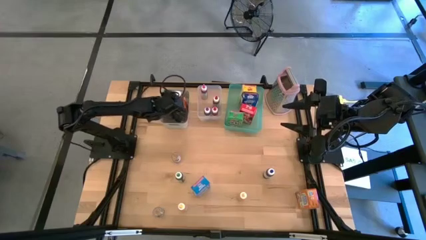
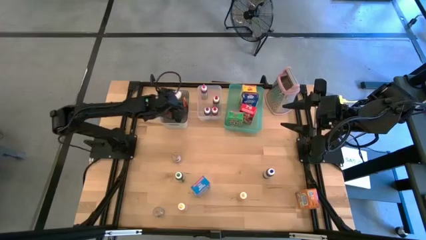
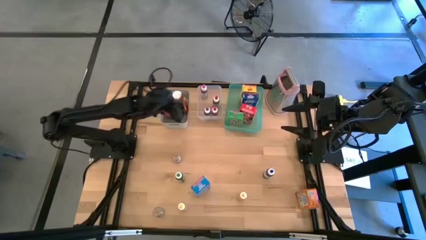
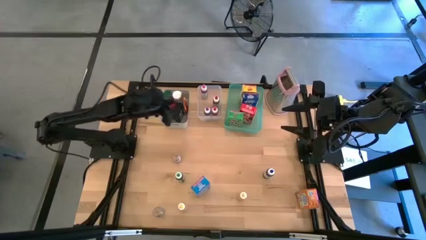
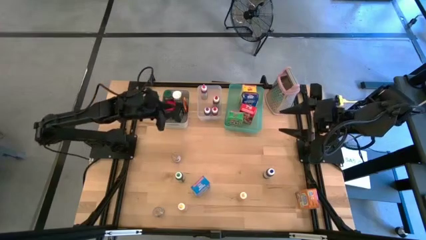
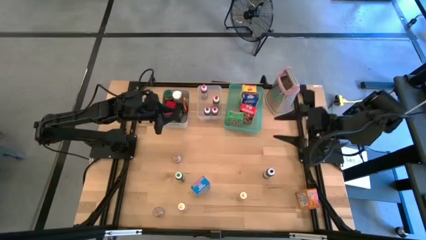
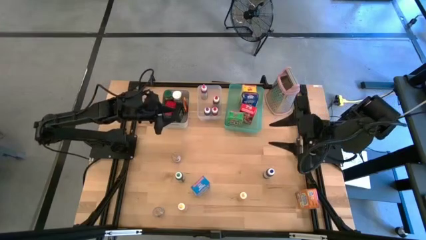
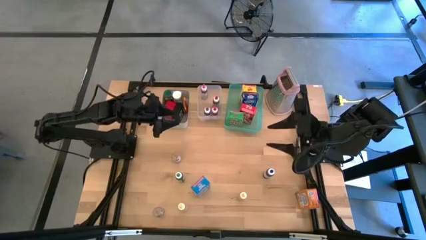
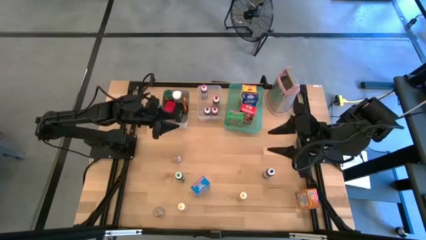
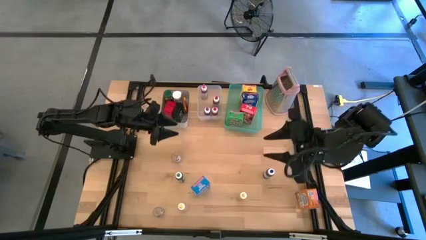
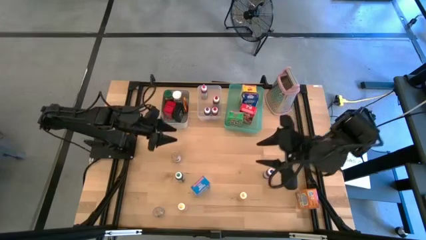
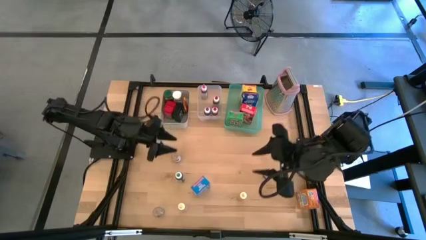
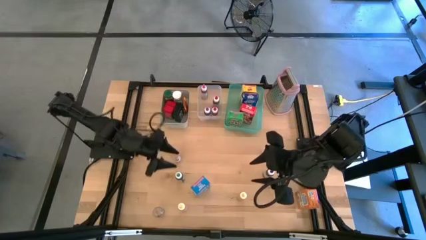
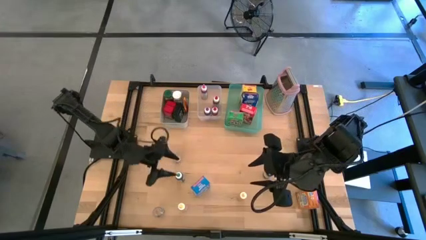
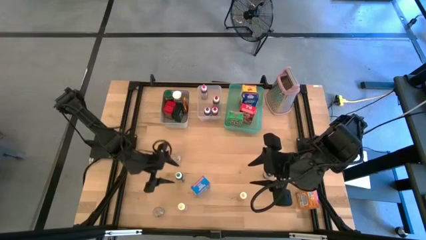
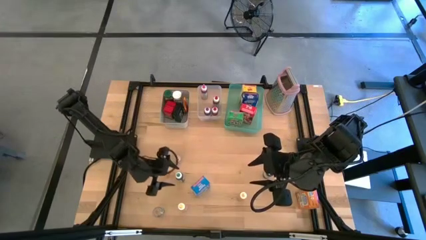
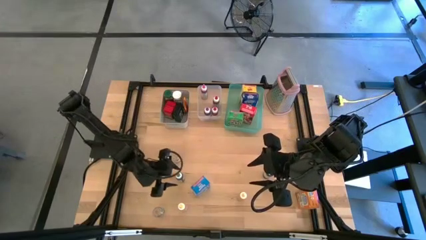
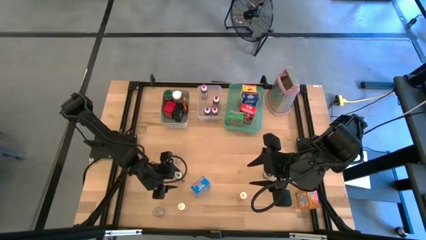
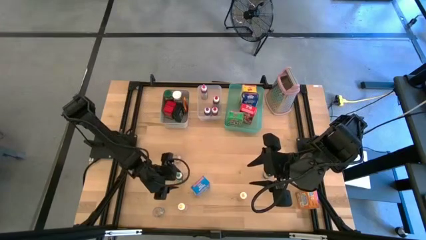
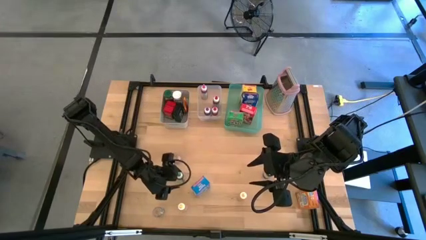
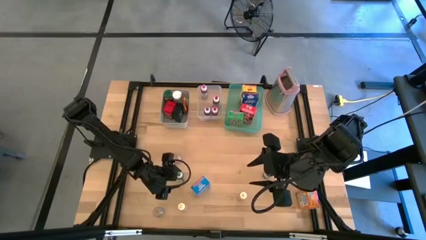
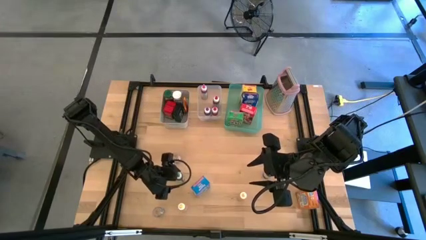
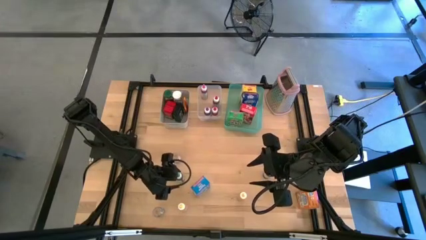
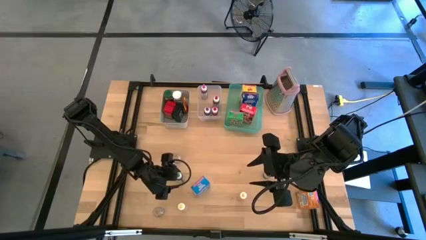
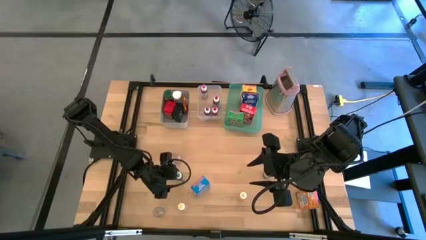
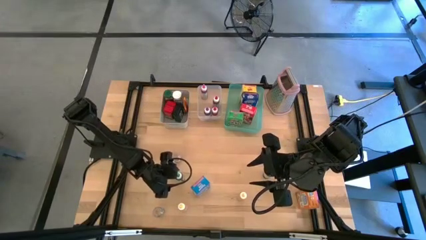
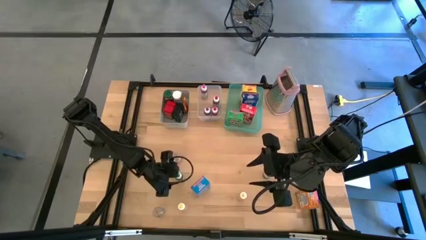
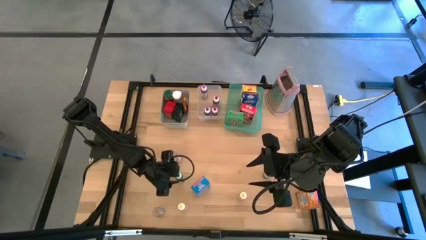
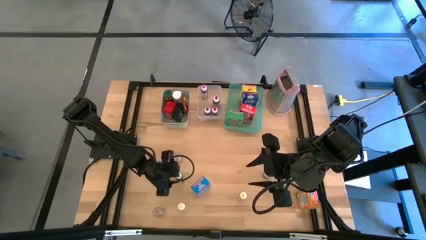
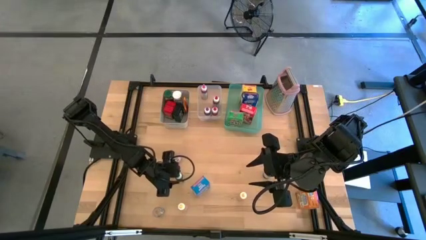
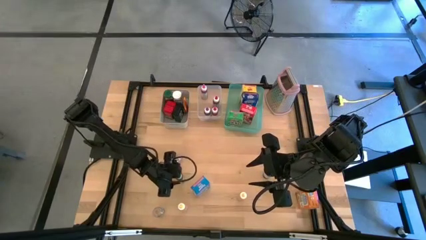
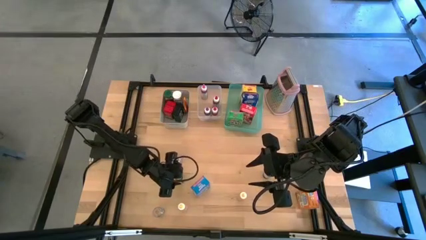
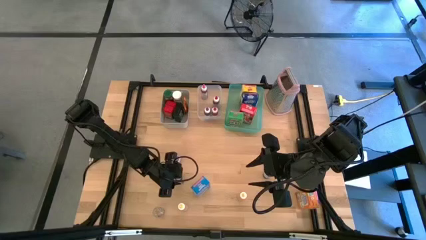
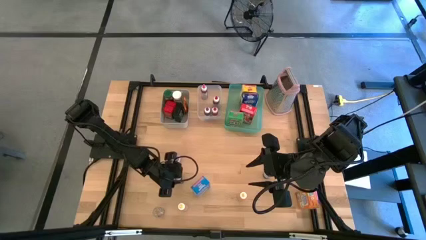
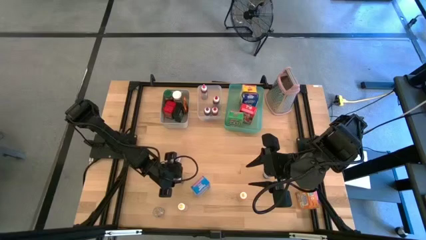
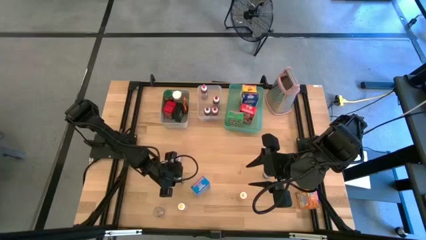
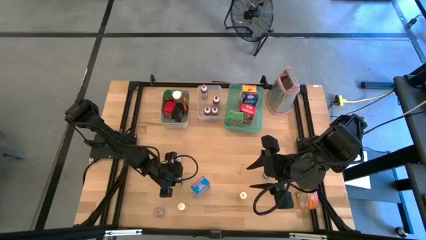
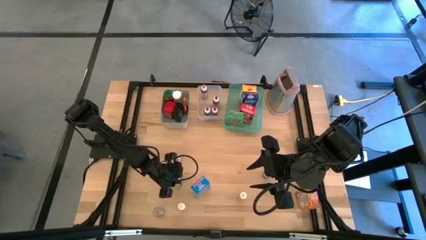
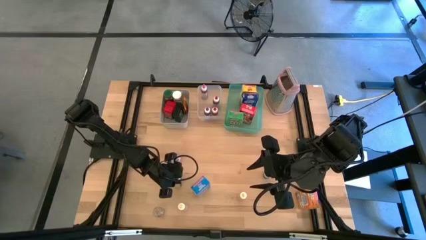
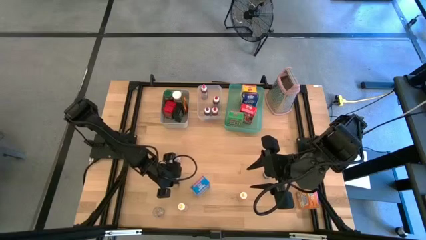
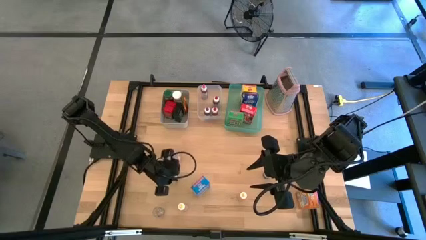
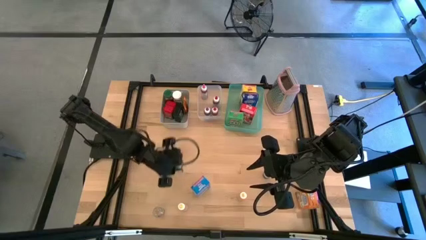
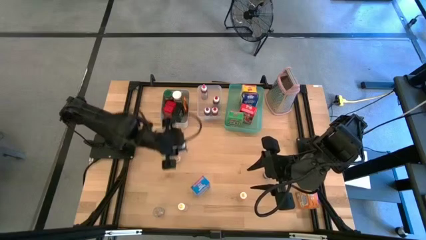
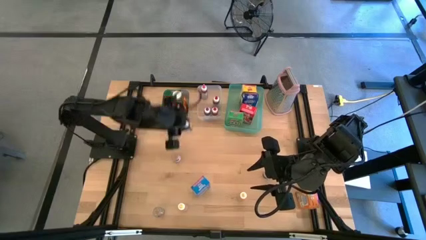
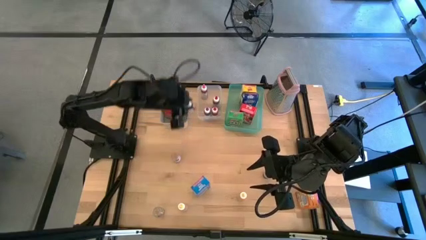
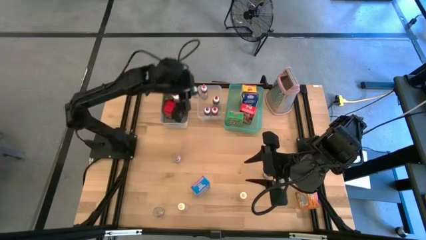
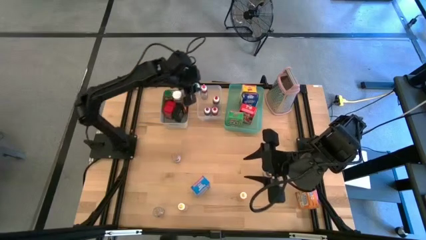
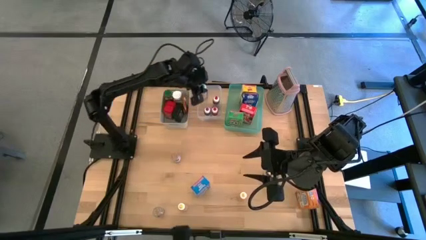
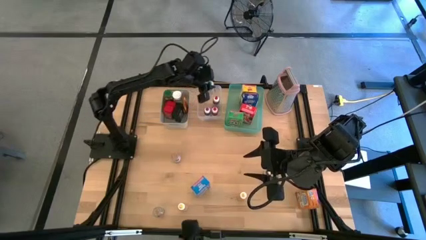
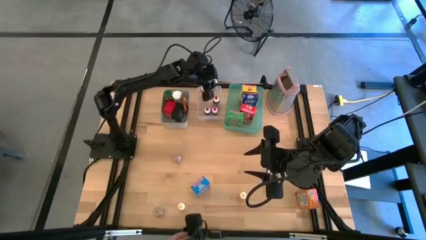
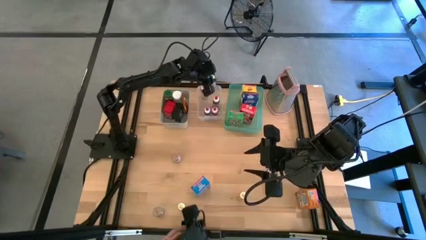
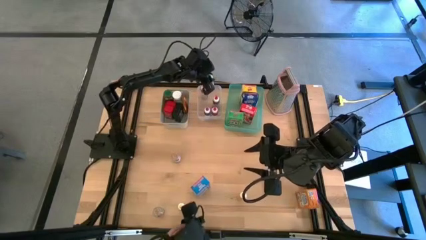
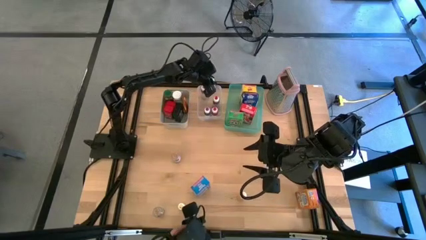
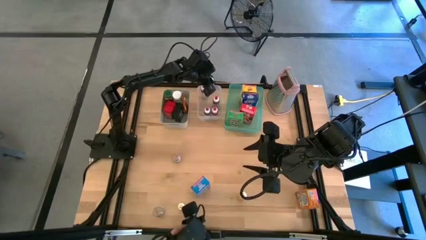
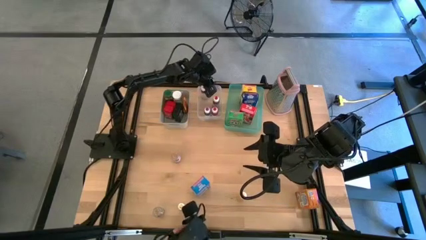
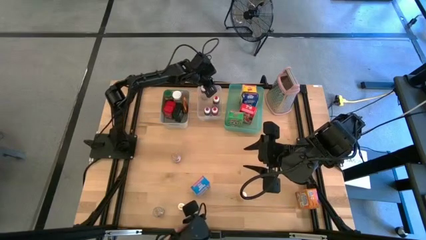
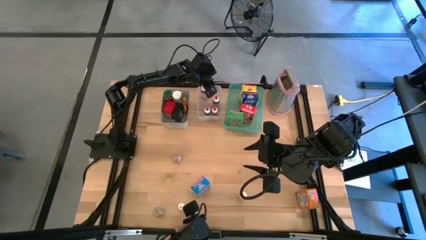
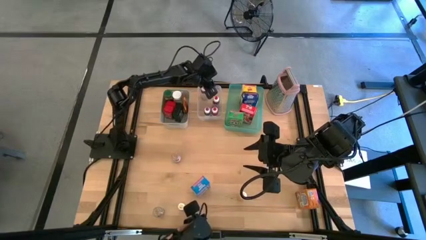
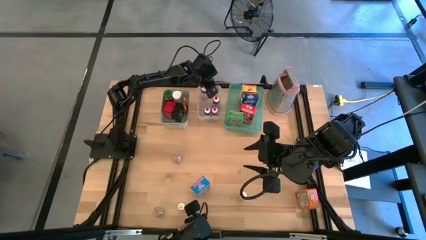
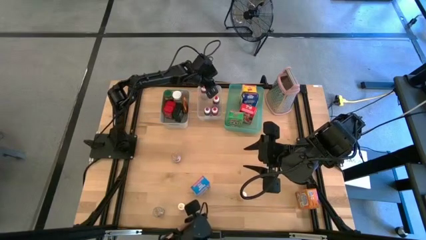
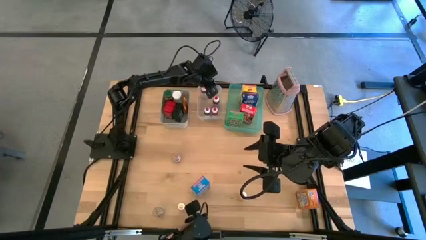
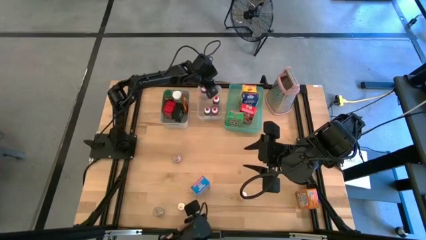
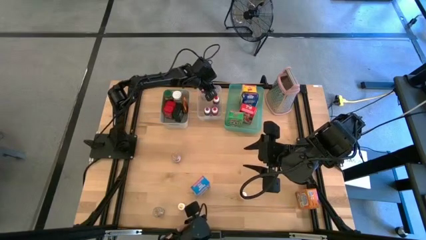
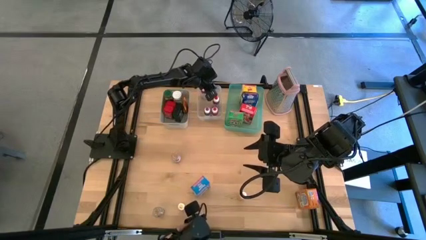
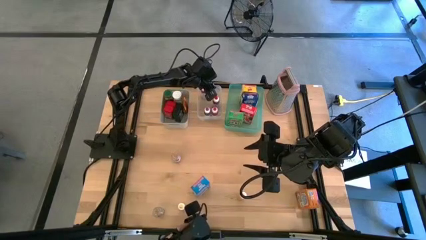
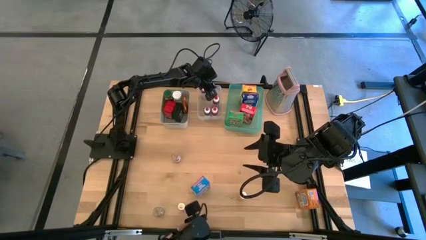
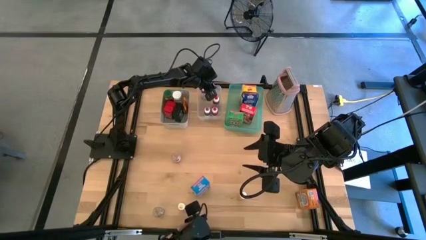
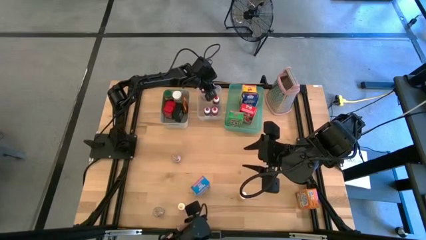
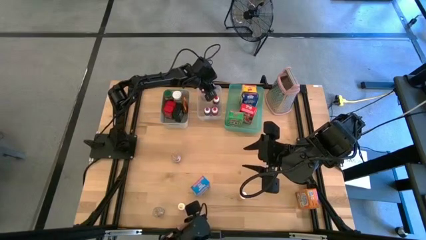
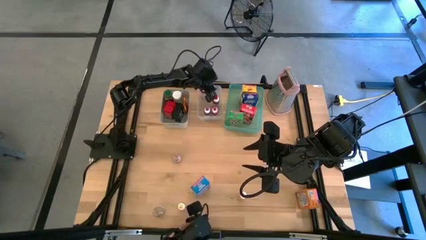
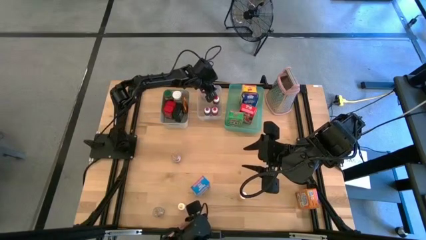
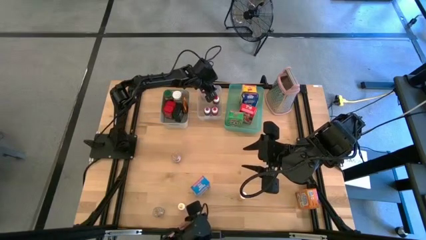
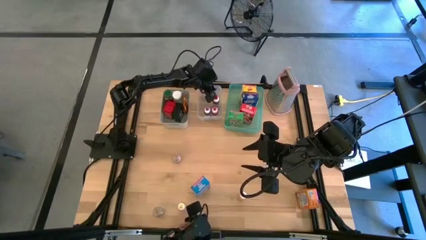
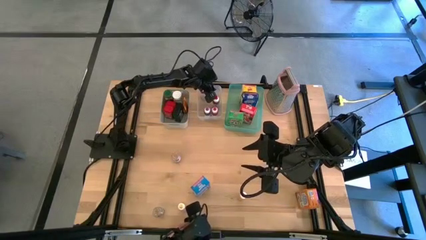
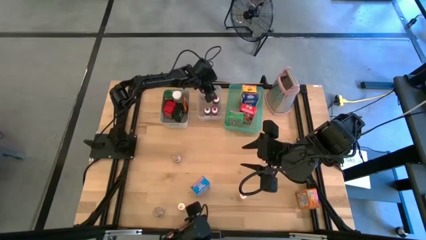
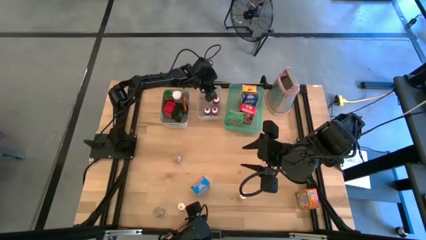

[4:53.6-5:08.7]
Task: Pick & Place Kitchen Items
Put the green food coloring bottle into the transparent bin
